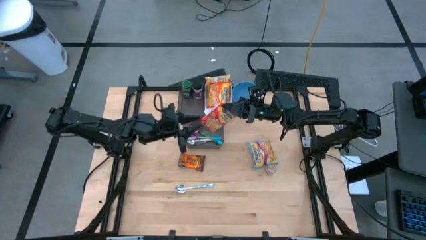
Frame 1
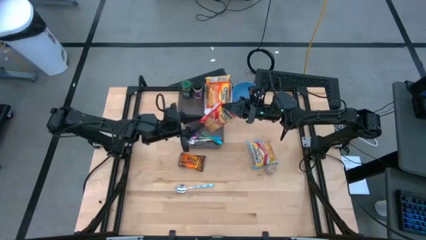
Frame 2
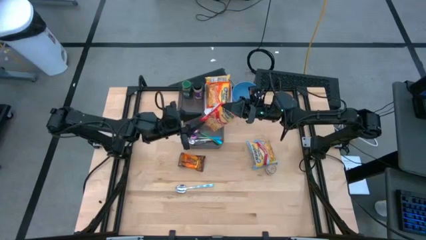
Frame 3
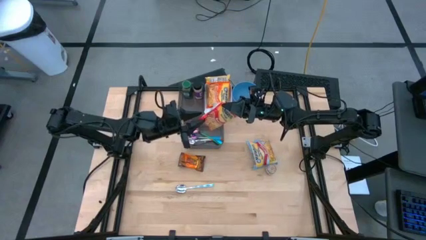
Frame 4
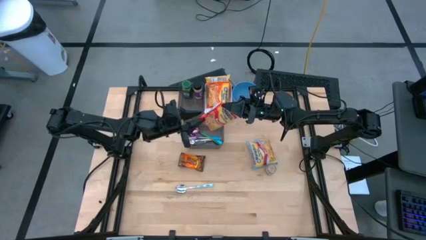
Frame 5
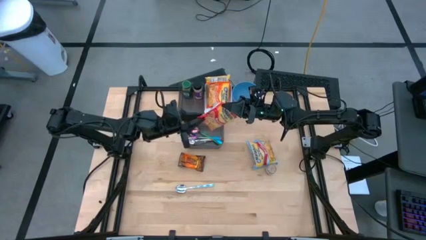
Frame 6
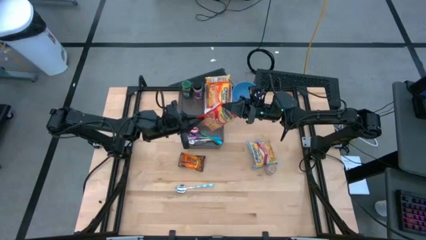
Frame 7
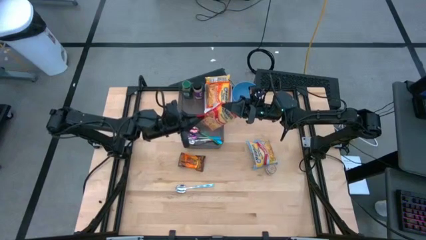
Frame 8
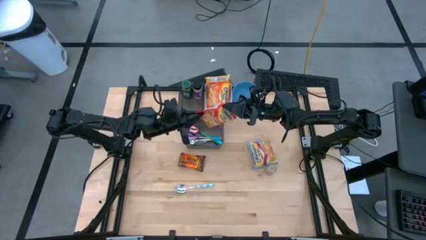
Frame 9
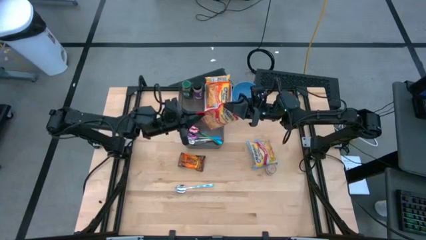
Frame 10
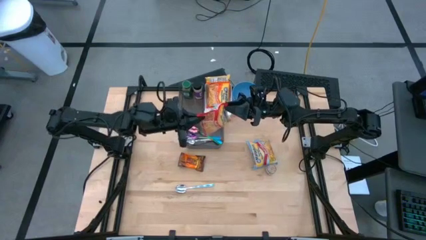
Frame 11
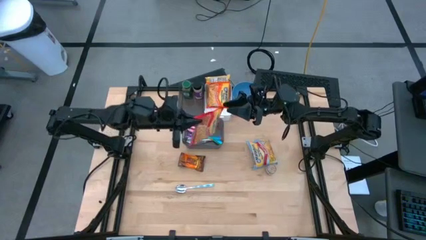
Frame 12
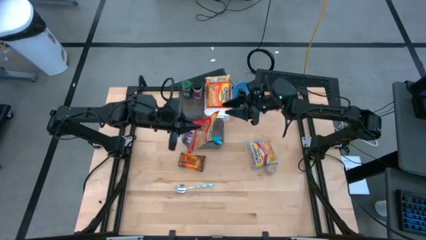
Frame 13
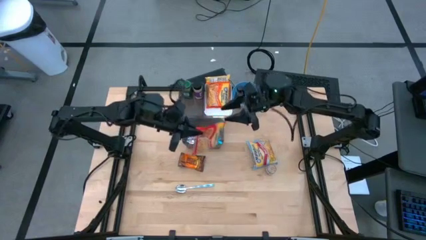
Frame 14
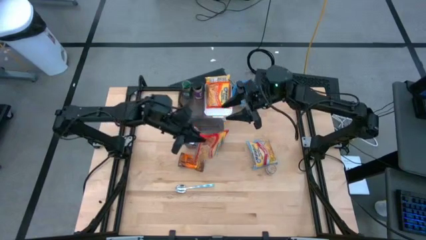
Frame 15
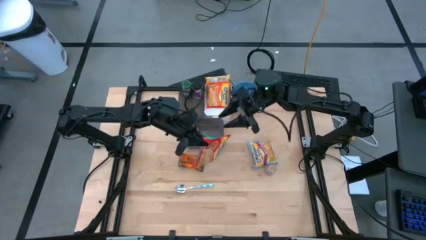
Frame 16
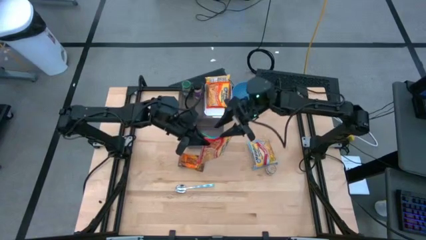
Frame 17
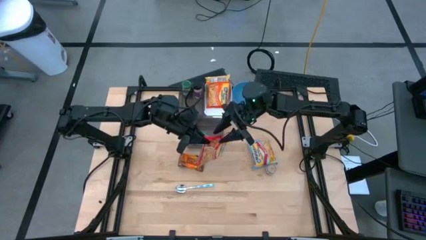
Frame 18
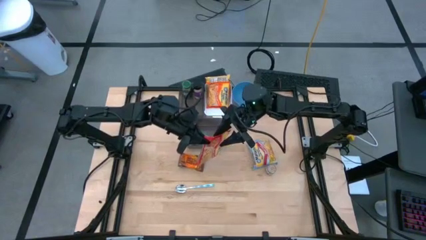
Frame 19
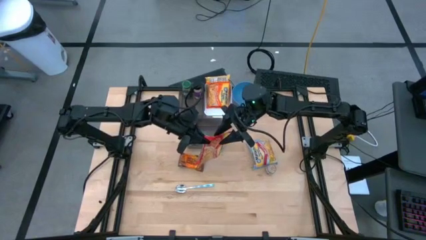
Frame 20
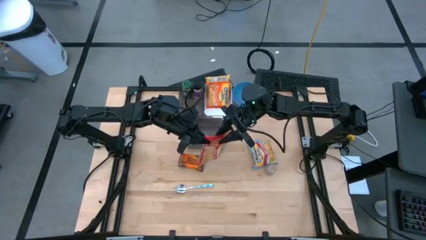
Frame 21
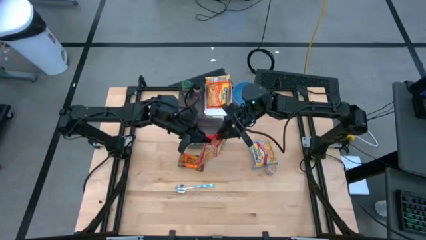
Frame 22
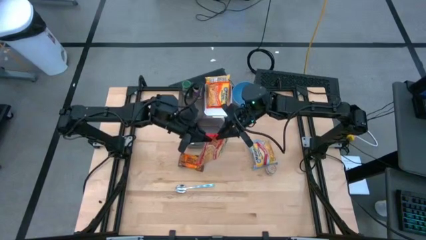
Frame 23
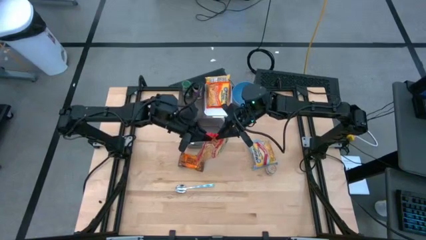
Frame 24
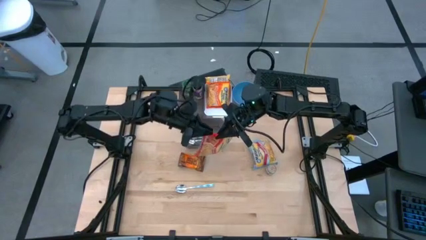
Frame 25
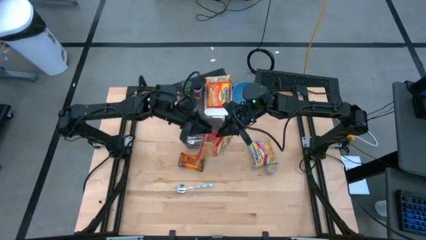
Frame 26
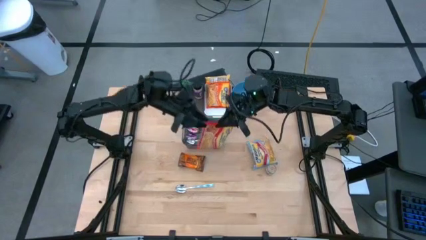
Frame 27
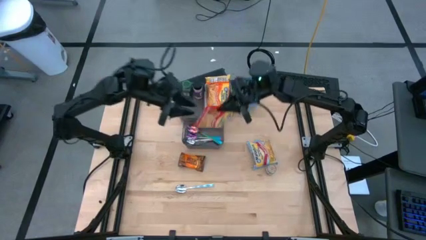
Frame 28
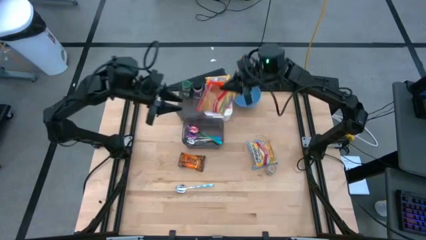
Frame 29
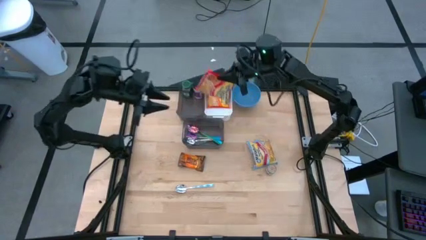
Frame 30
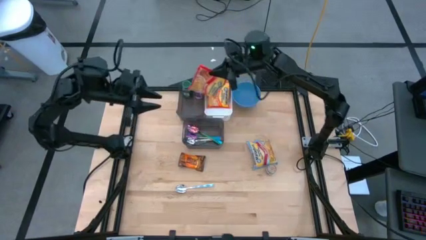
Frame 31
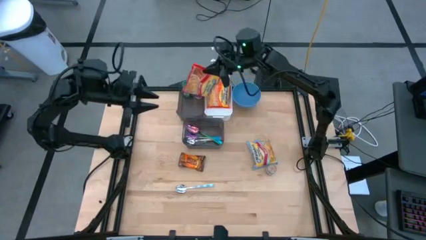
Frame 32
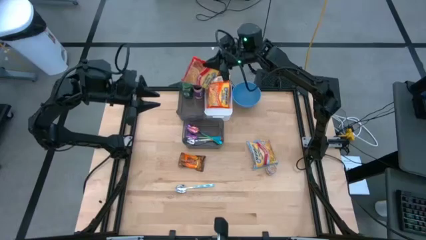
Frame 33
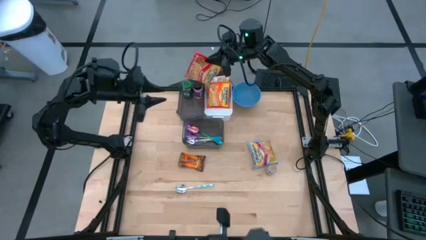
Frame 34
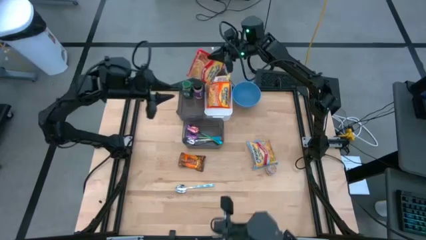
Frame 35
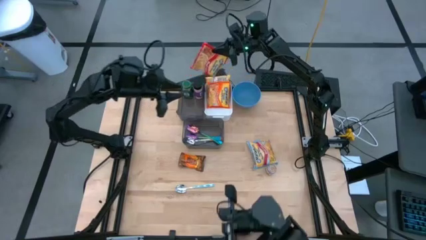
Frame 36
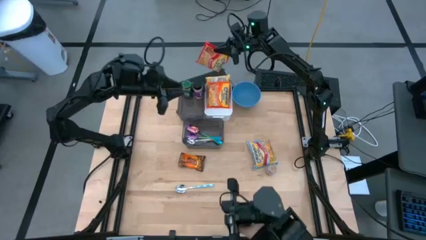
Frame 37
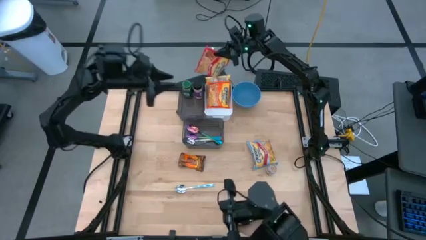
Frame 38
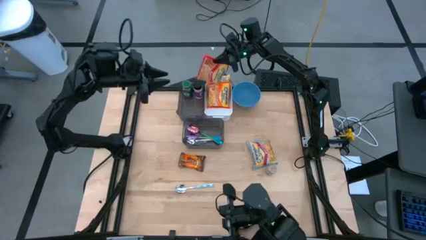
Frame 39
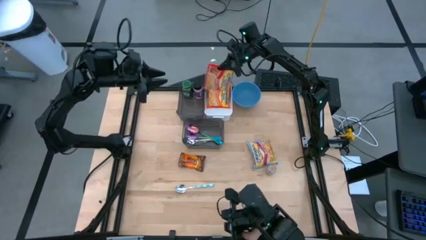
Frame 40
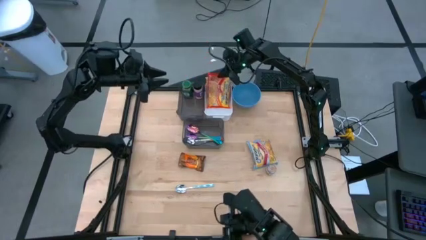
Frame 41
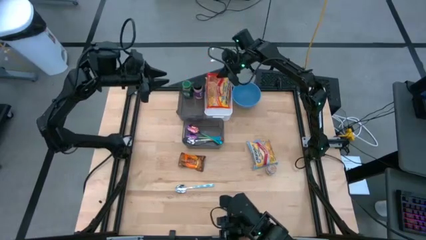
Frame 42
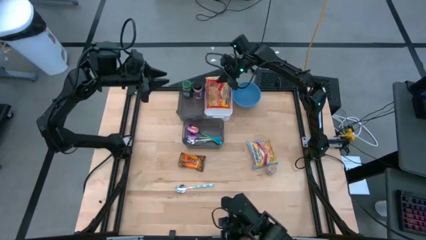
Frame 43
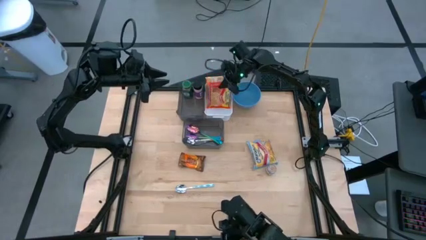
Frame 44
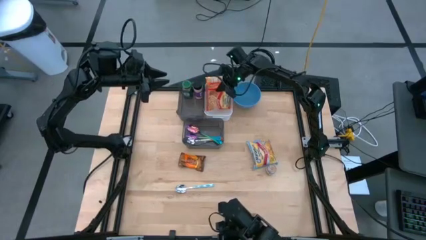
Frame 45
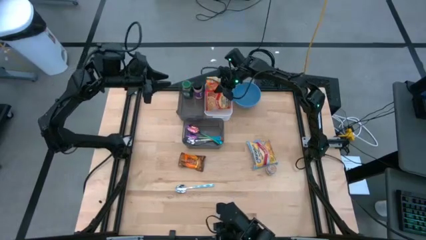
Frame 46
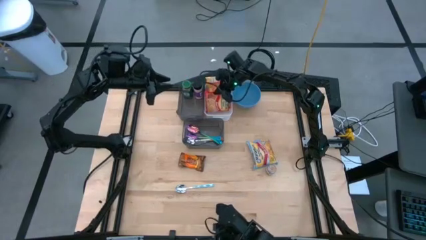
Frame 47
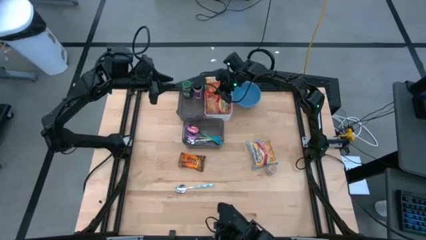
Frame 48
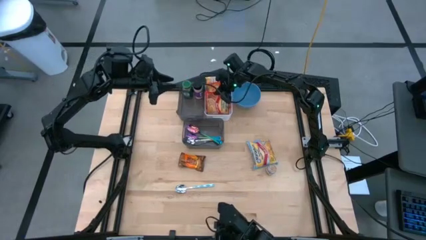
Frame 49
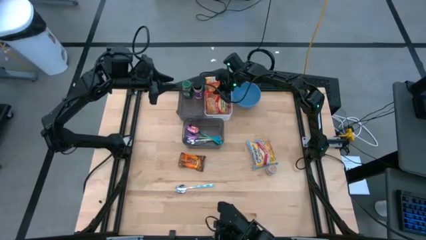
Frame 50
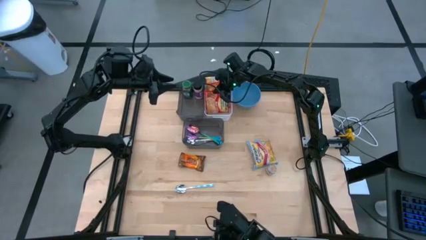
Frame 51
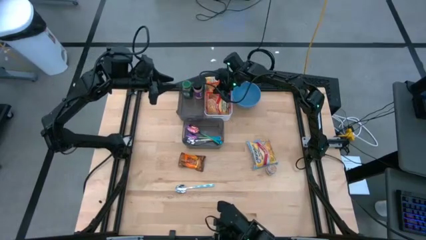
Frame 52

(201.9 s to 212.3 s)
Task: Pick & Place Food Item
Put the red noodle pack into the white bin

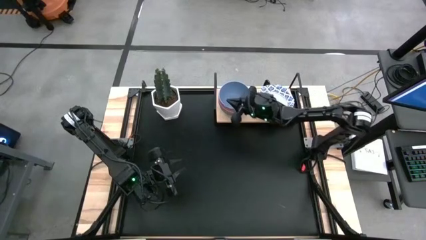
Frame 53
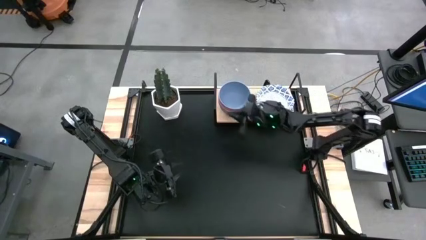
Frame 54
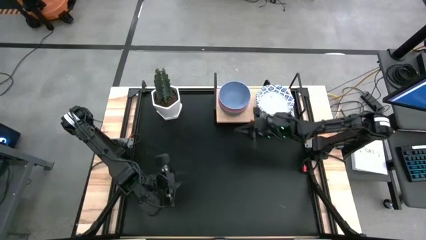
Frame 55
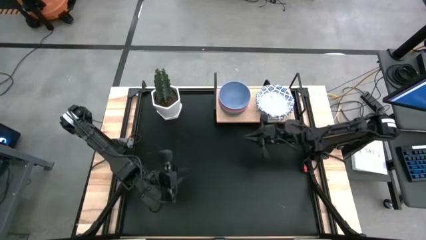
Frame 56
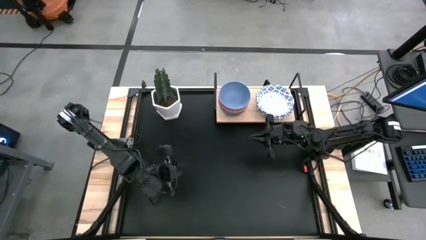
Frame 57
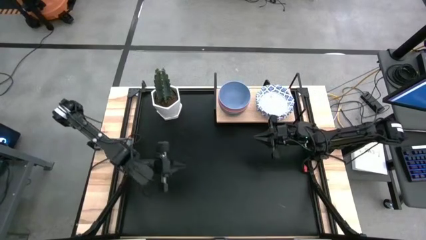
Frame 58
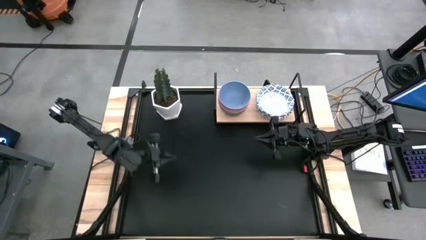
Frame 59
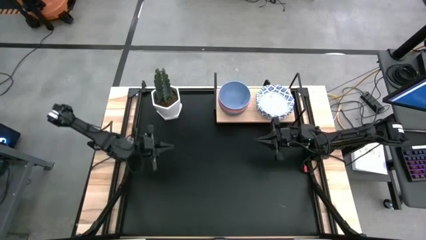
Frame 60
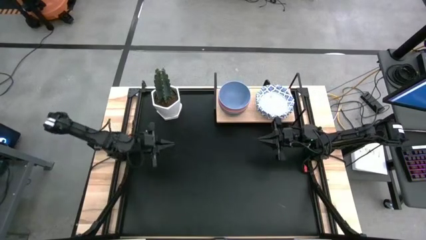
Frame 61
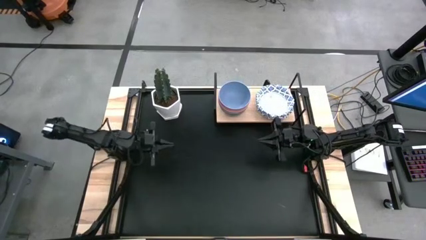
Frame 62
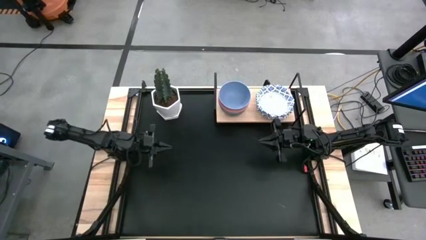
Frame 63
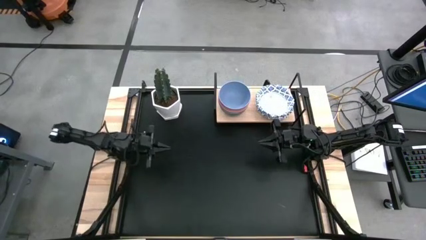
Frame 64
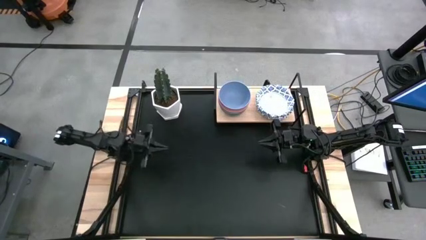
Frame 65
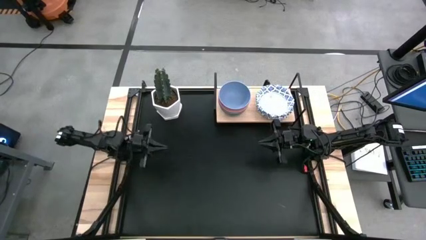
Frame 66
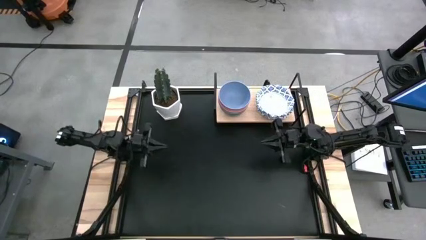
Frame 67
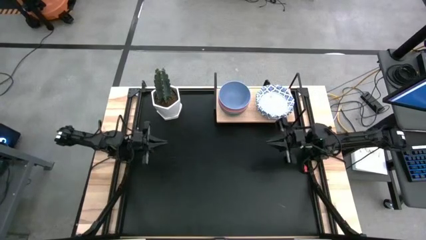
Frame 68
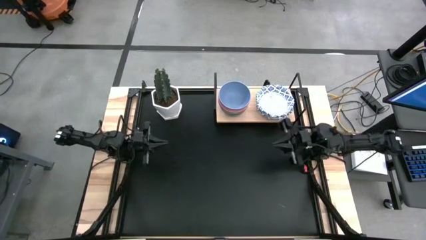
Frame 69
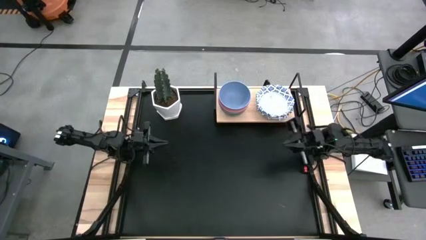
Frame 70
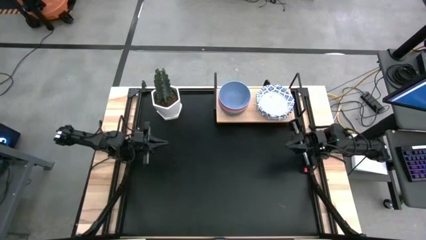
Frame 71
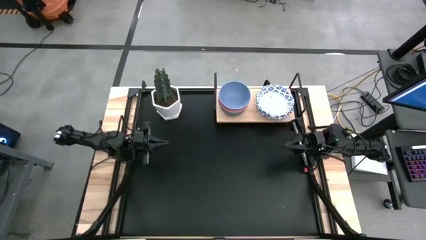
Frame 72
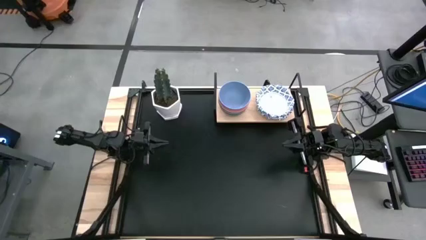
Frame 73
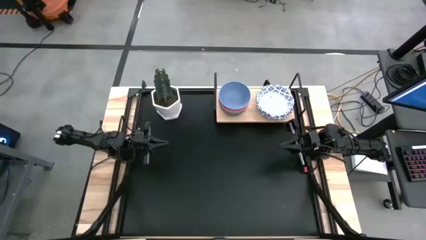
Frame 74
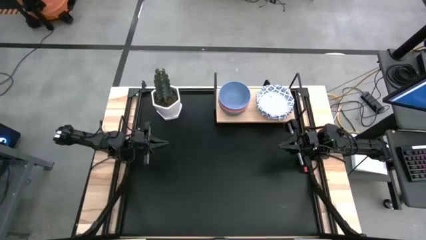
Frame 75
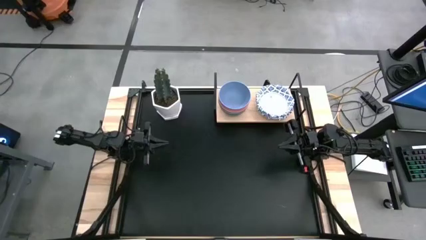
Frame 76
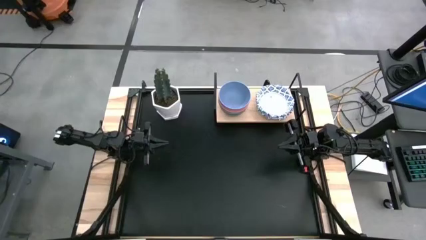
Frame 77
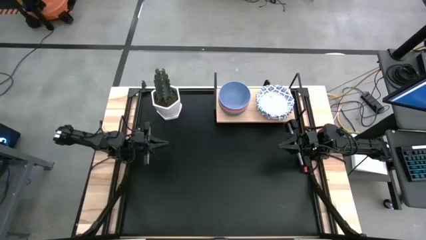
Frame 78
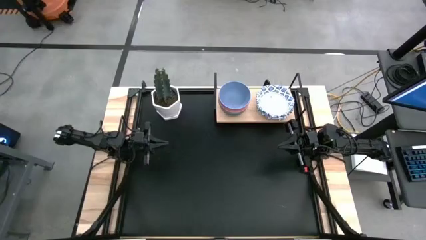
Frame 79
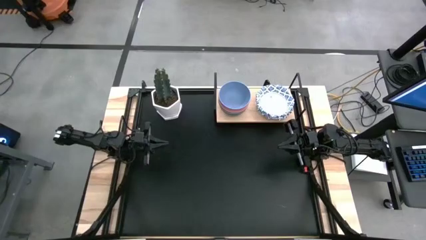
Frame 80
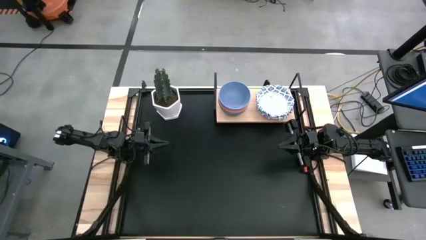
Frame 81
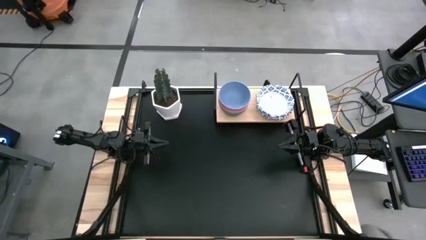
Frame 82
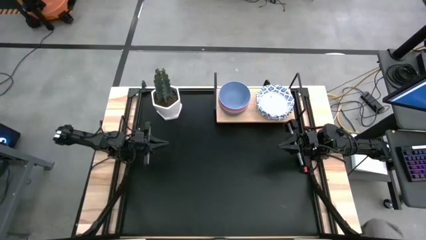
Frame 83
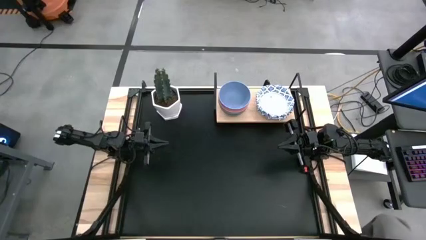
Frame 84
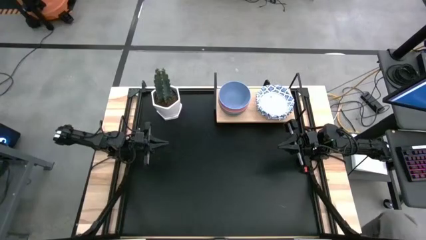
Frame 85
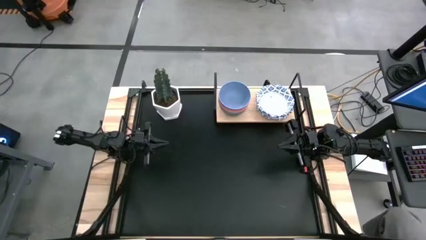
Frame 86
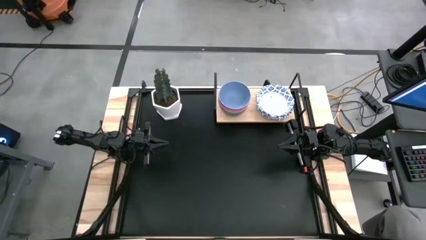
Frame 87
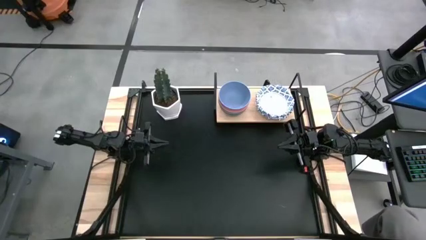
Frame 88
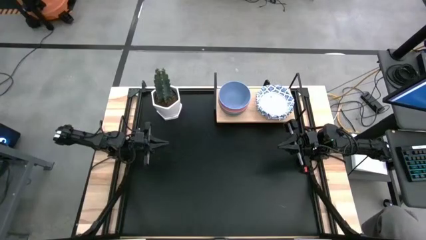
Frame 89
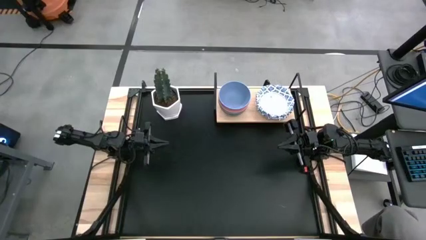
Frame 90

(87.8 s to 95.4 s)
Task: Place and stack bowls onto a shelf
Return to Home Position
